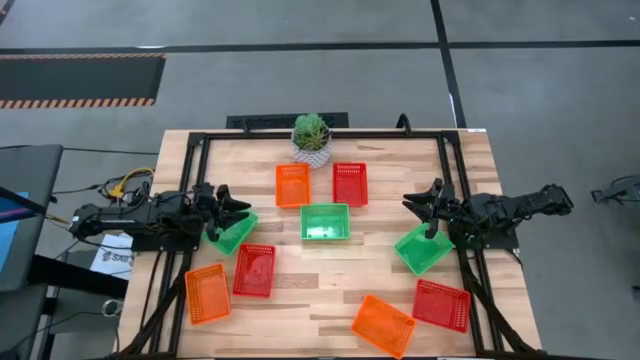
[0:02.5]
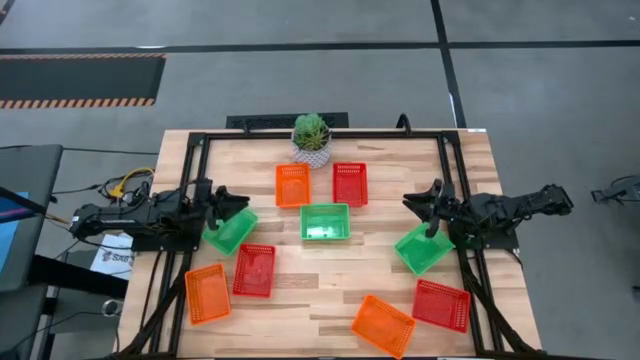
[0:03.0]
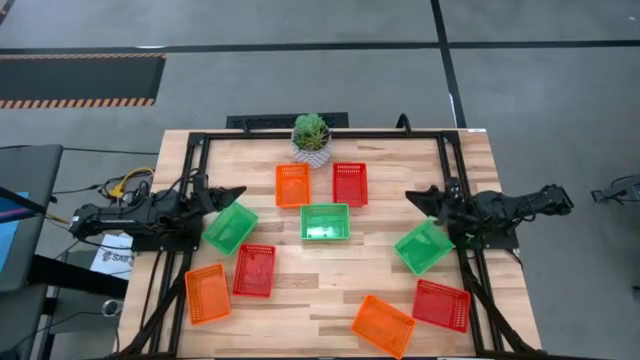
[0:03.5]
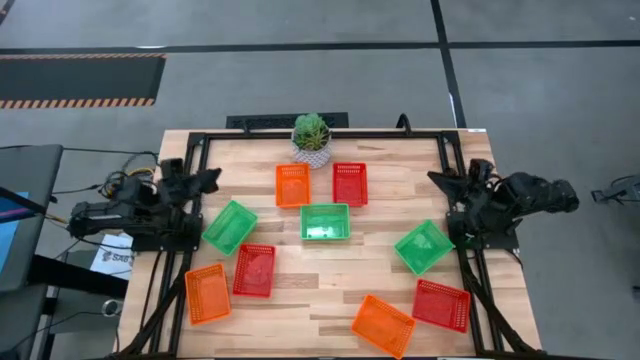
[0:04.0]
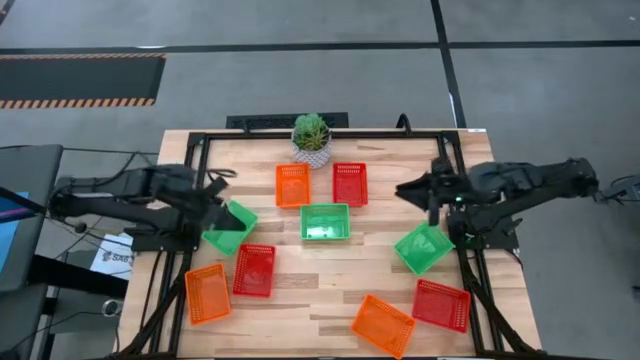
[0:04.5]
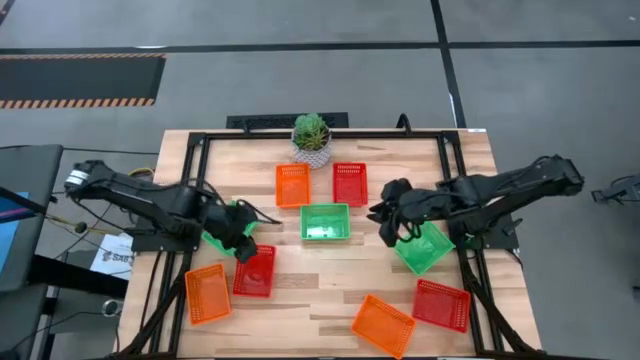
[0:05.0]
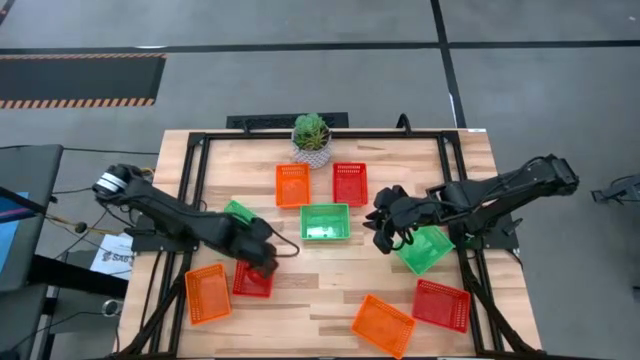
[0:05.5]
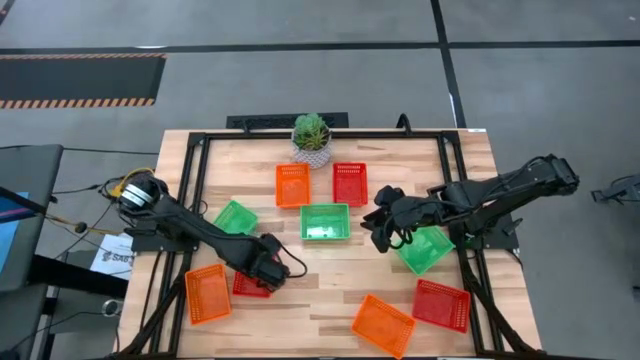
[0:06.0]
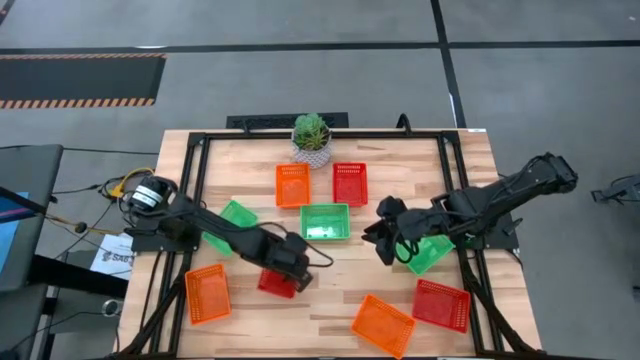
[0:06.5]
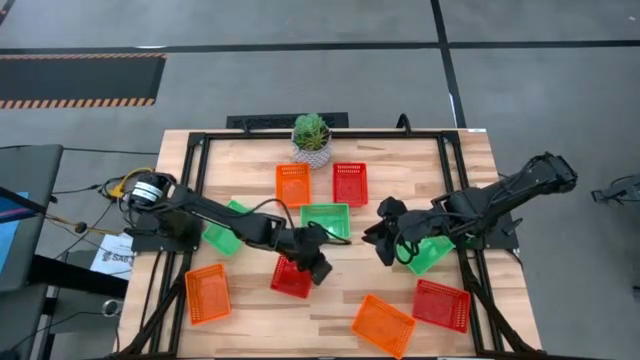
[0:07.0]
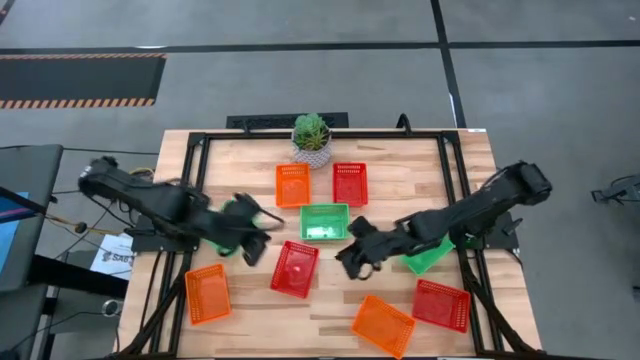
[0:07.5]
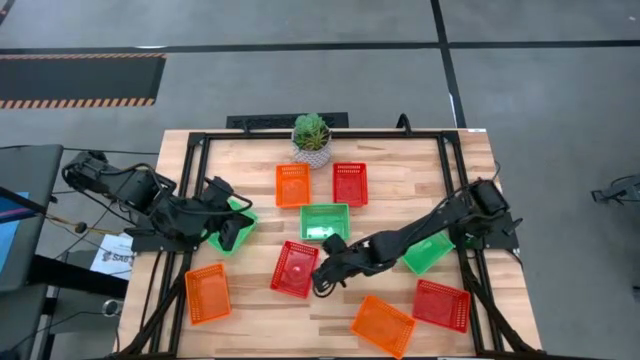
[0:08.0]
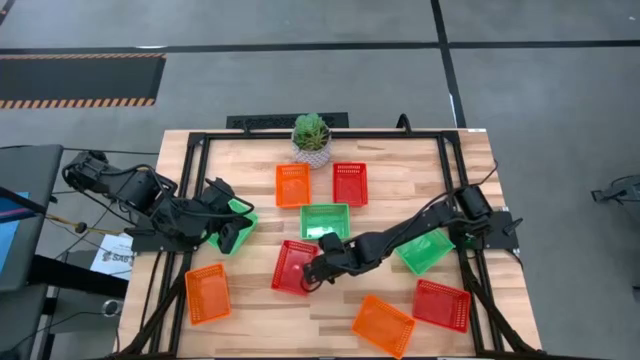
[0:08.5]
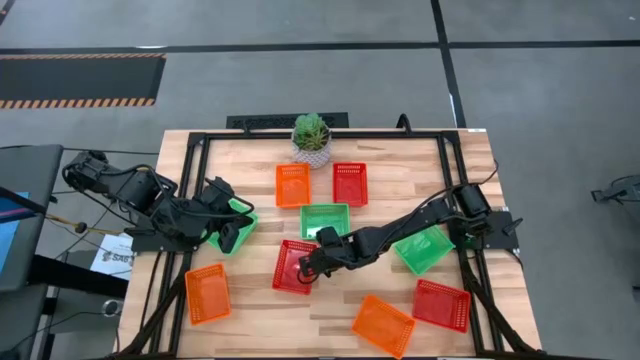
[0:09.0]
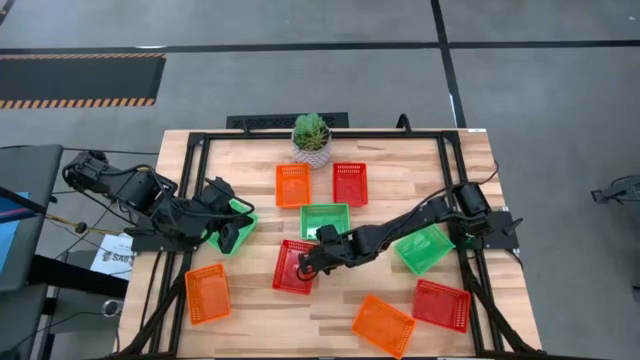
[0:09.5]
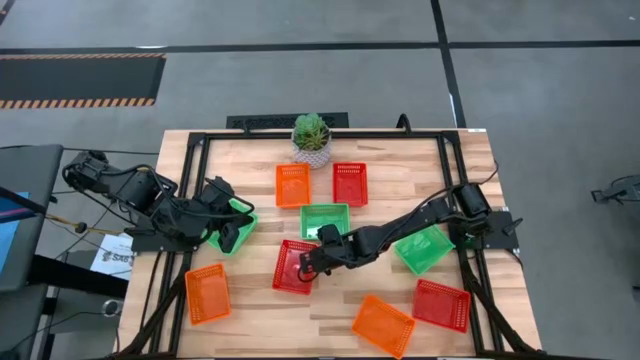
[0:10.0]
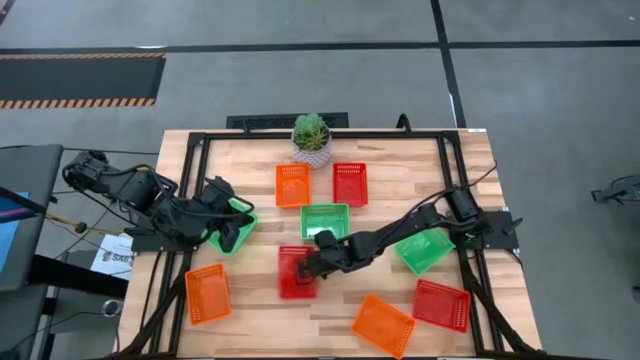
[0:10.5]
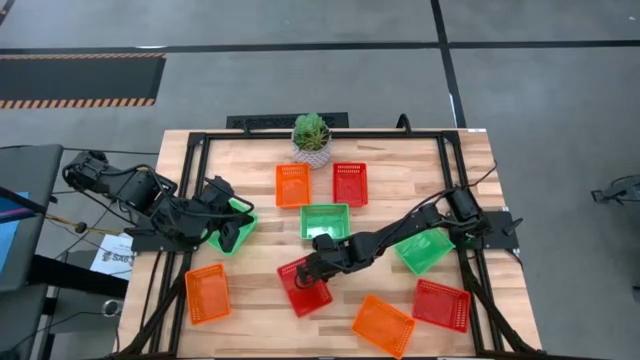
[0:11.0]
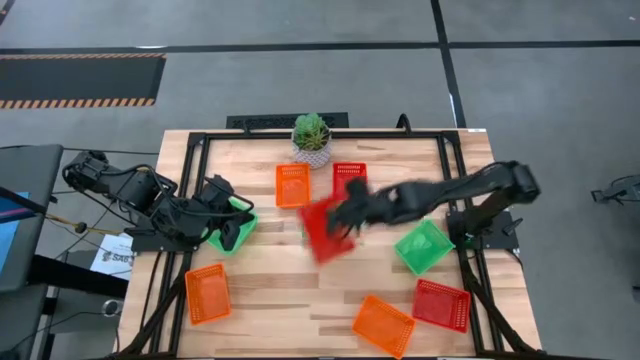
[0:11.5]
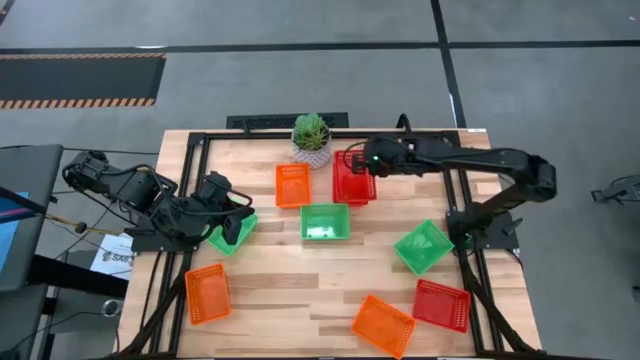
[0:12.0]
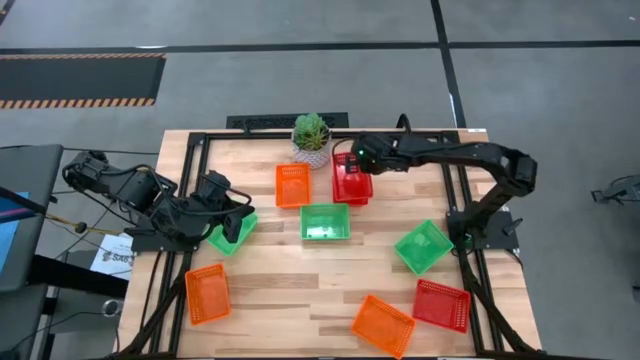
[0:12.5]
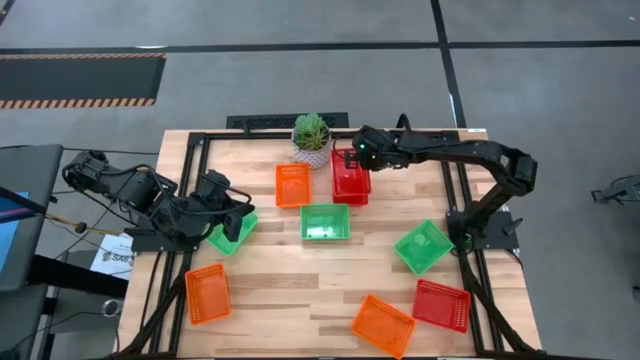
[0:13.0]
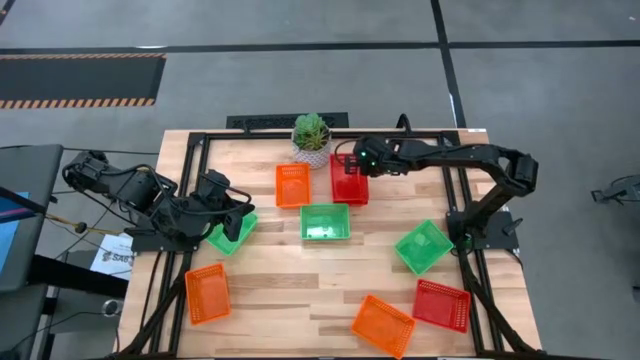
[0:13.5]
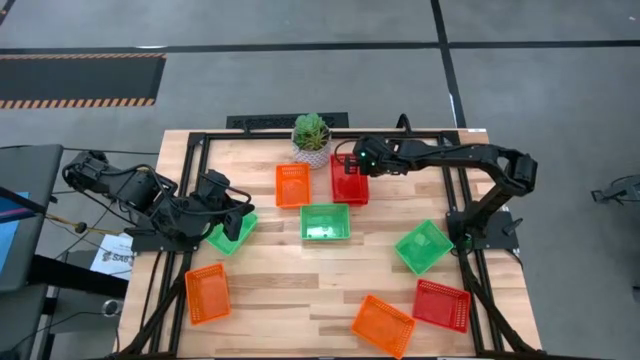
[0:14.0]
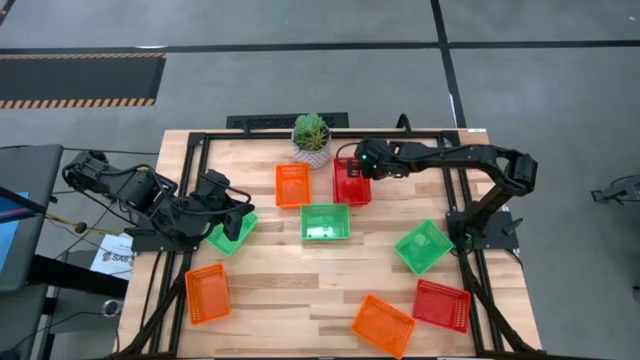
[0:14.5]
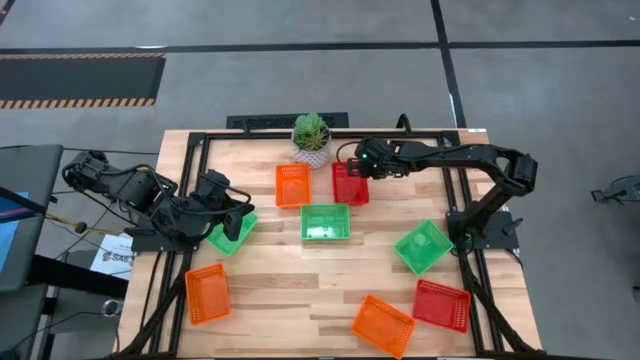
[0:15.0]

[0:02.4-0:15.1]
Stack the bottom left red bin on the top red bin

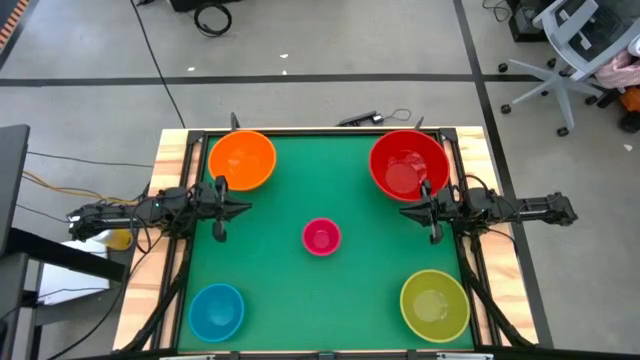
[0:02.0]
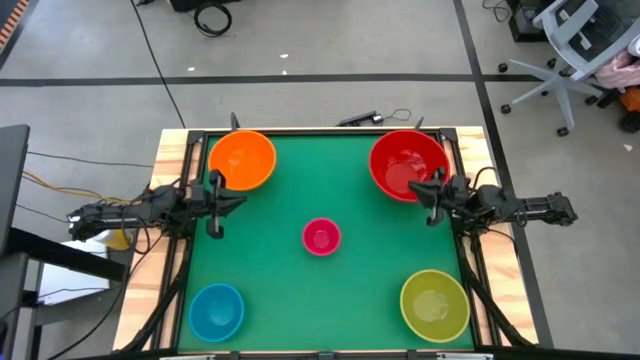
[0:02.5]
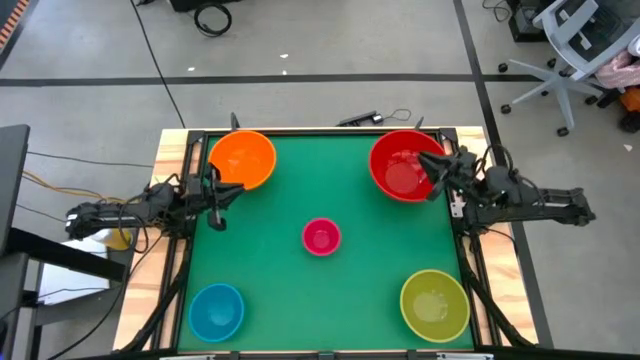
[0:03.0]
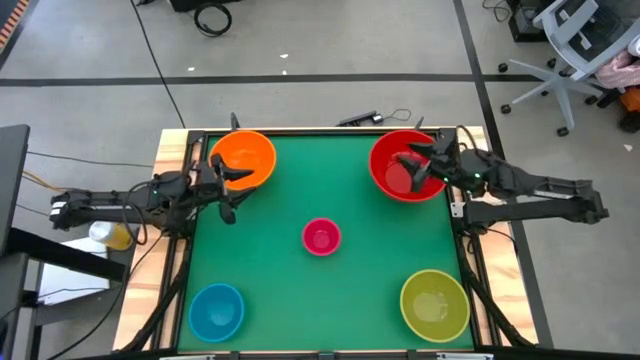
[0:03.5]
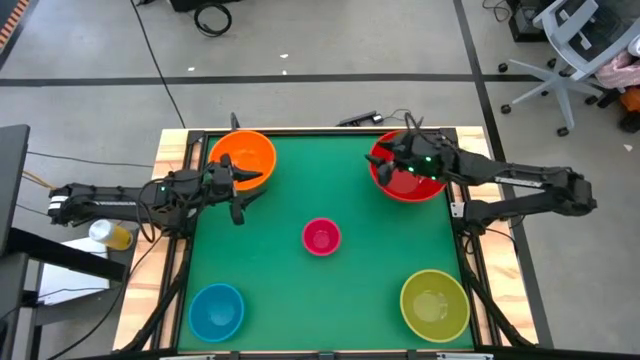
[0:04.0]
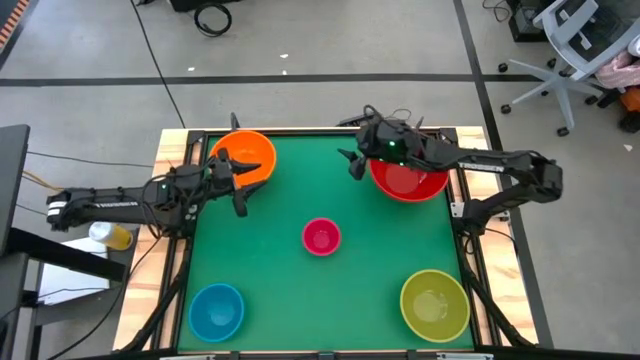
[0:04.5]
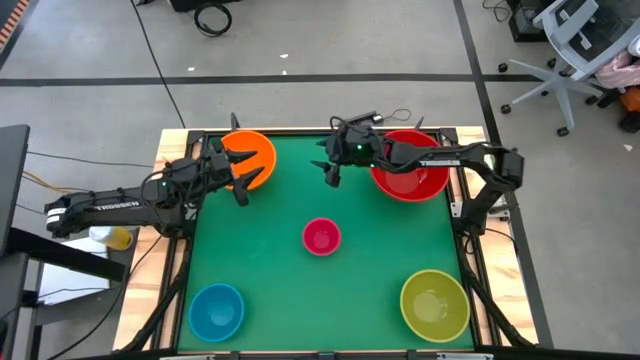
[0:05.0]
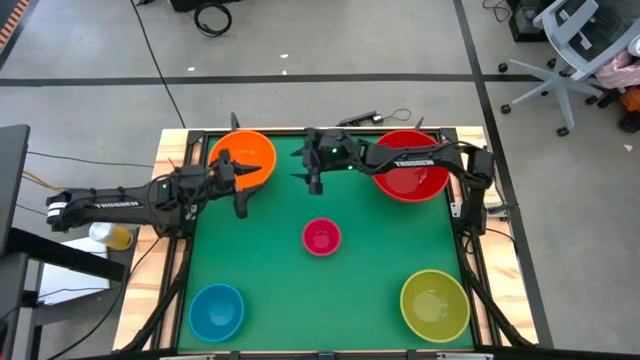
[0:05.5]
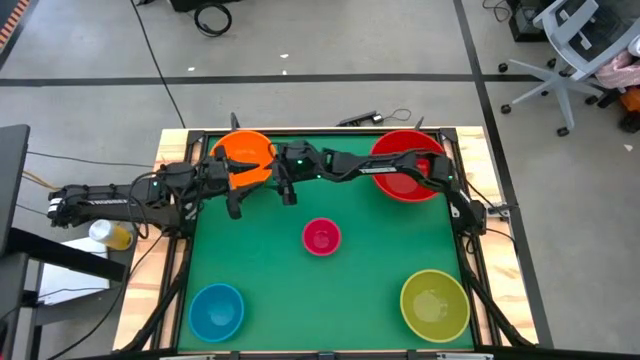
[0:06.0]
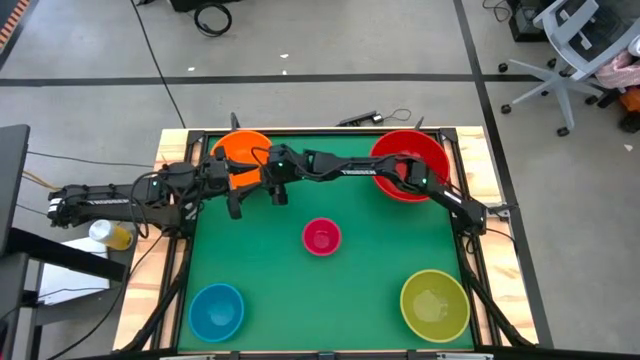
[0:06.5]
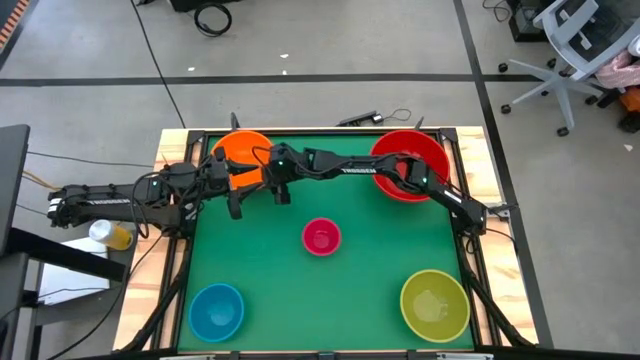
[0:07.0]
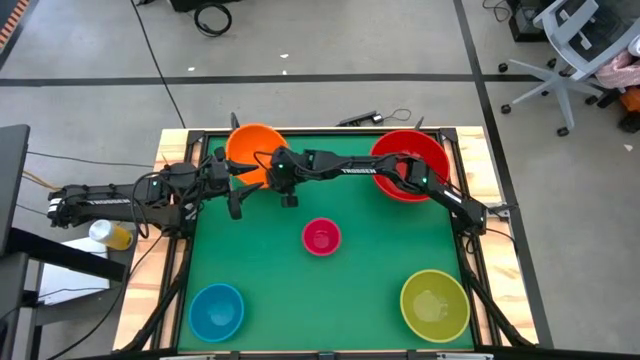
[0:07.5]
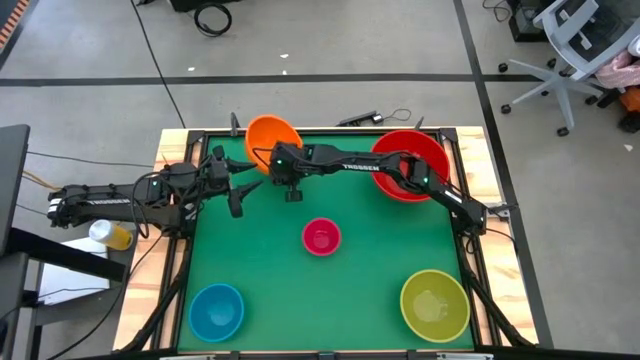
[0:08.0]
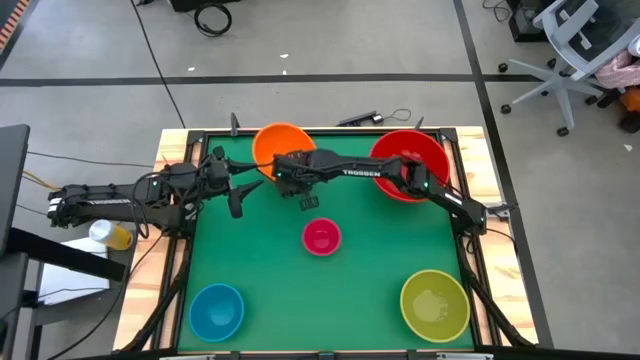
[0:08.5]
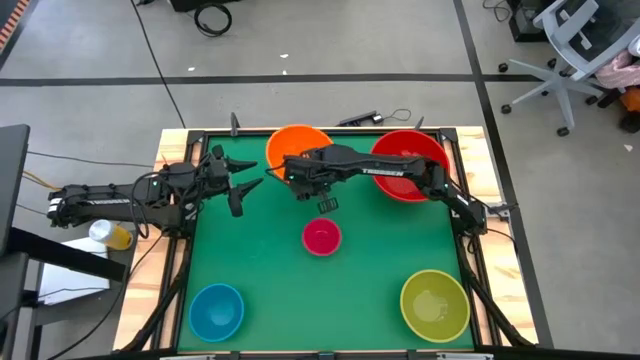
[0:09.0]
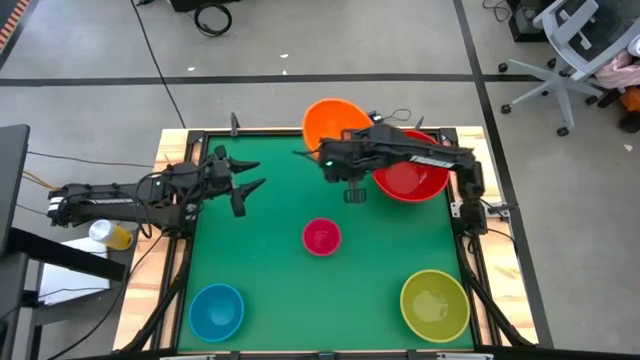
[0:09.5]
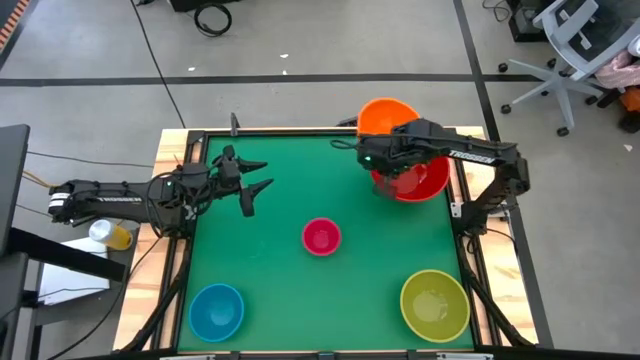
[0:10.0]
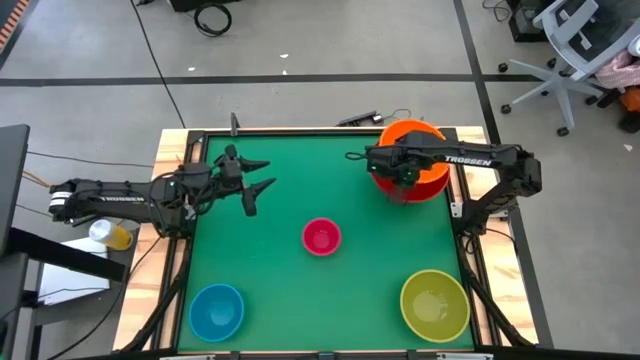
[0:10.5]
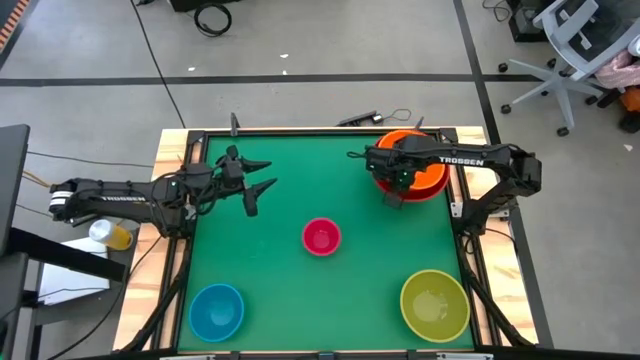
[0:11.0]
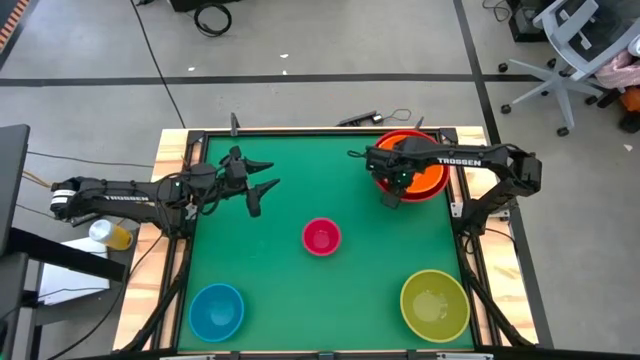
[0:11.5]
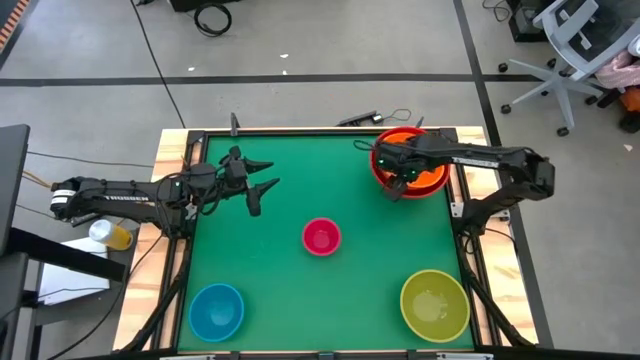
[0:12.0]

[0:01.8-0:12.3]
Stack the orange bowl on top of the red bowl
